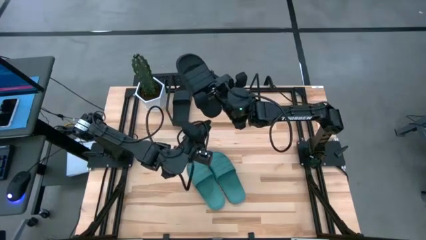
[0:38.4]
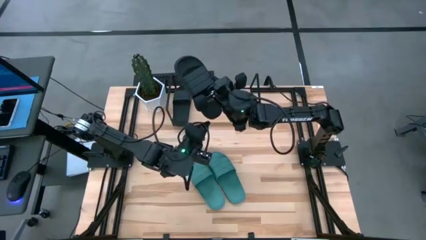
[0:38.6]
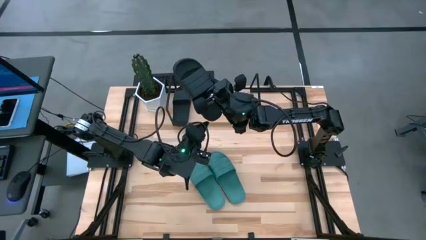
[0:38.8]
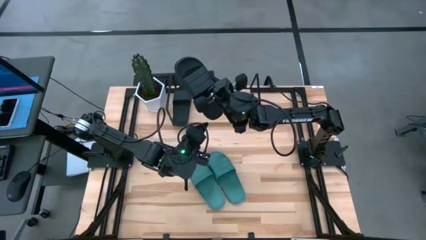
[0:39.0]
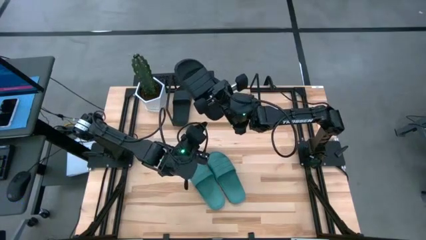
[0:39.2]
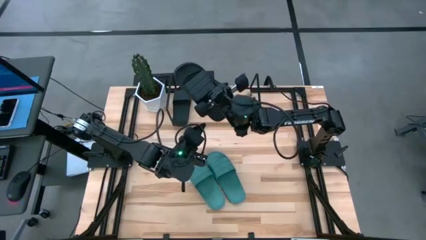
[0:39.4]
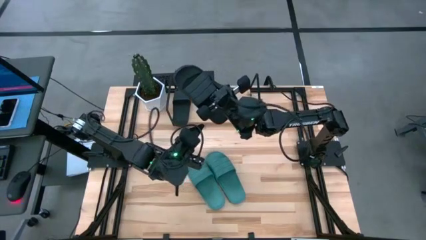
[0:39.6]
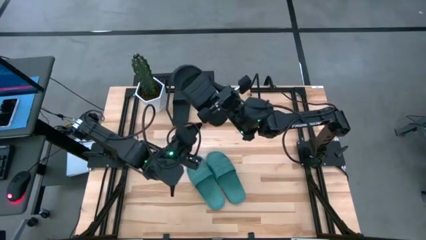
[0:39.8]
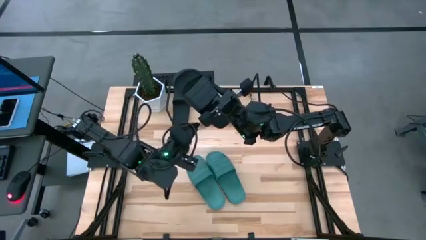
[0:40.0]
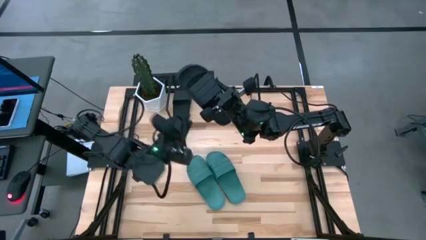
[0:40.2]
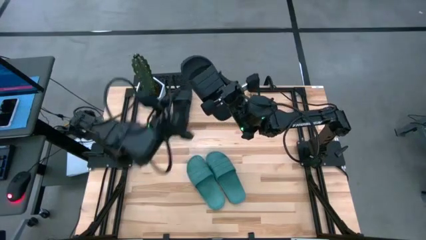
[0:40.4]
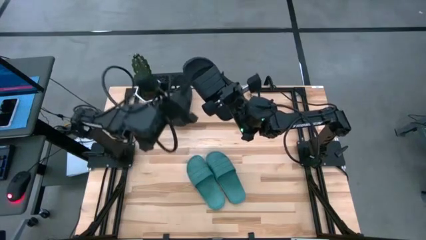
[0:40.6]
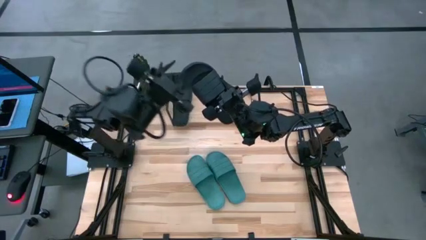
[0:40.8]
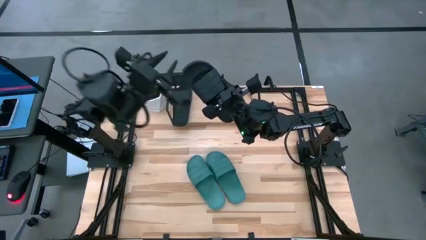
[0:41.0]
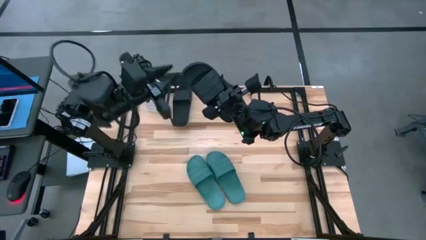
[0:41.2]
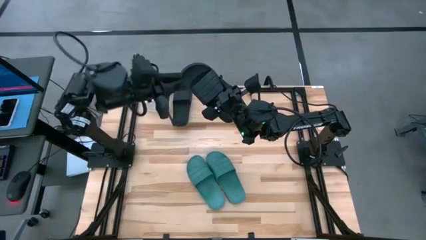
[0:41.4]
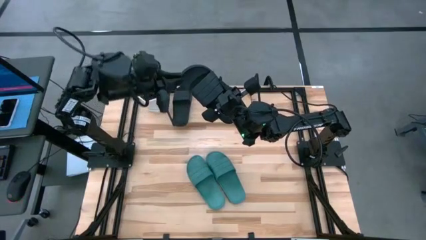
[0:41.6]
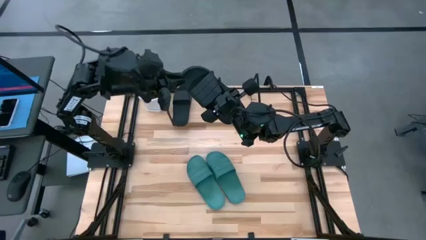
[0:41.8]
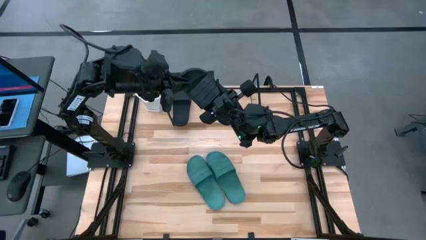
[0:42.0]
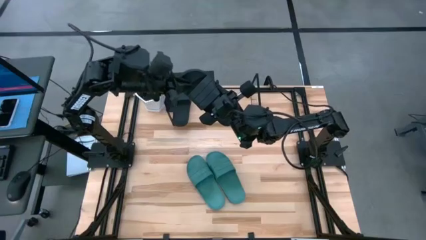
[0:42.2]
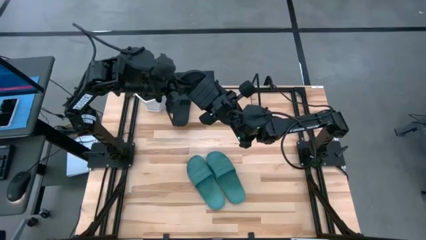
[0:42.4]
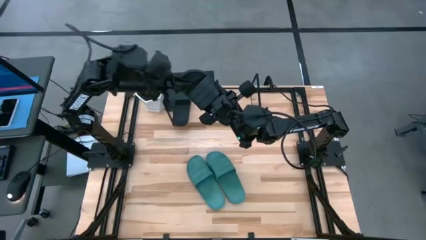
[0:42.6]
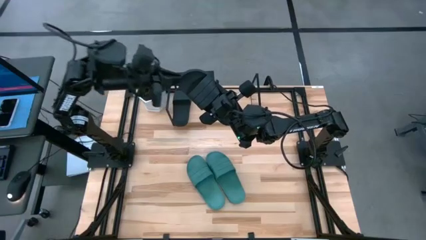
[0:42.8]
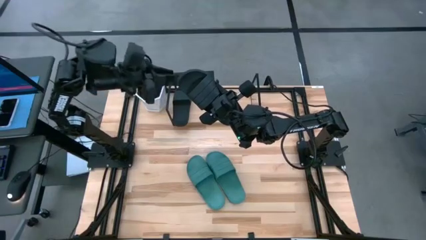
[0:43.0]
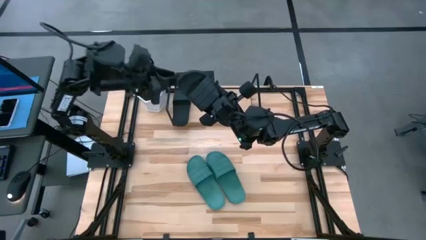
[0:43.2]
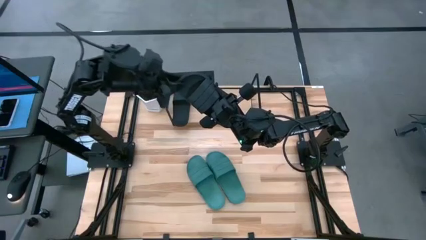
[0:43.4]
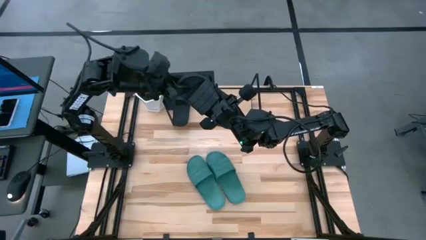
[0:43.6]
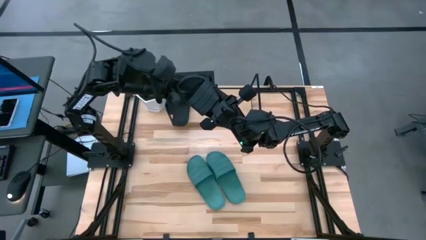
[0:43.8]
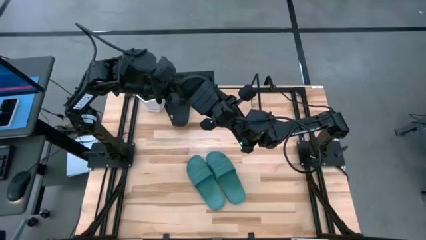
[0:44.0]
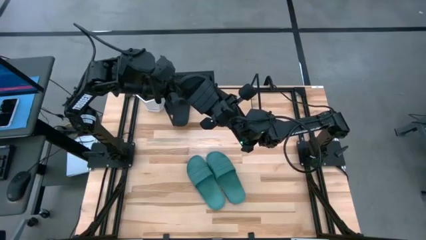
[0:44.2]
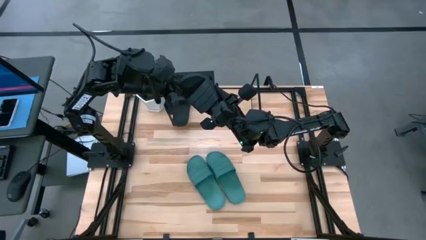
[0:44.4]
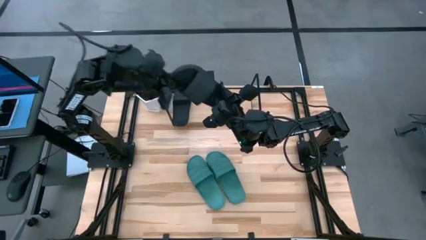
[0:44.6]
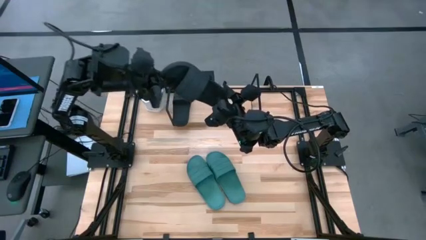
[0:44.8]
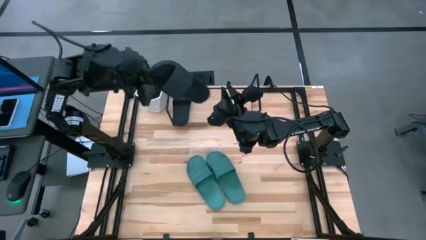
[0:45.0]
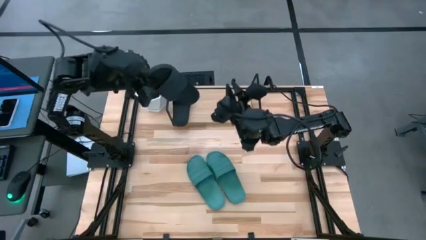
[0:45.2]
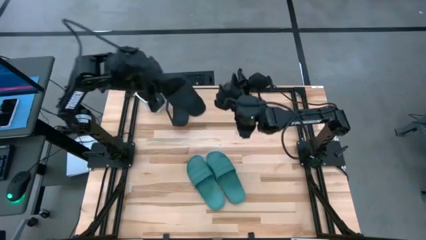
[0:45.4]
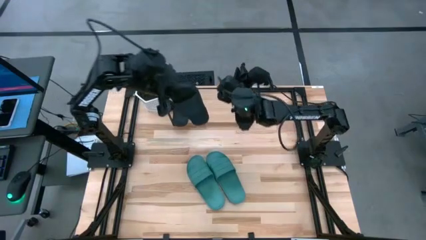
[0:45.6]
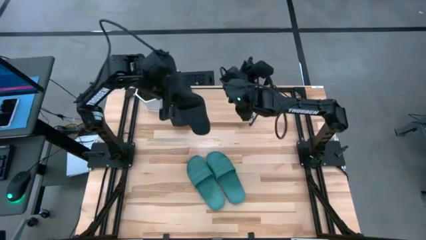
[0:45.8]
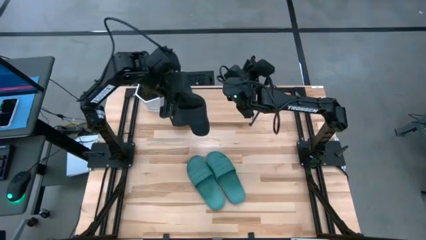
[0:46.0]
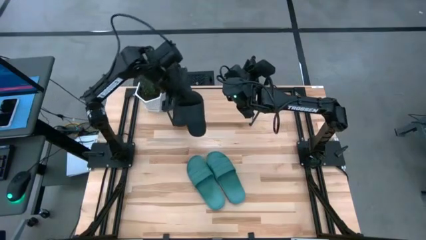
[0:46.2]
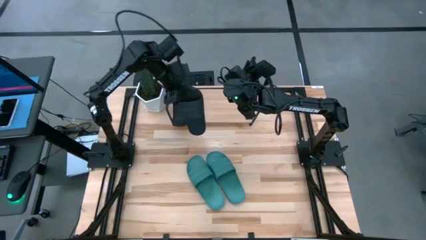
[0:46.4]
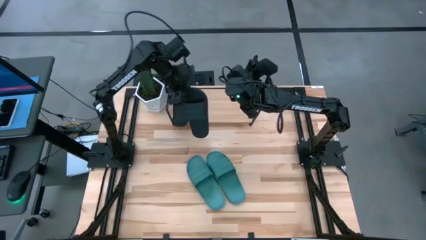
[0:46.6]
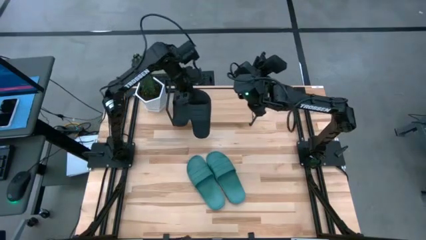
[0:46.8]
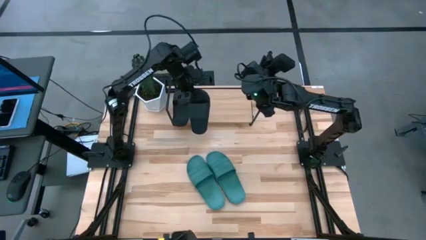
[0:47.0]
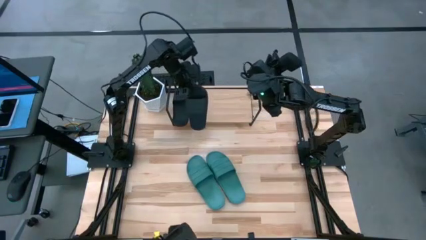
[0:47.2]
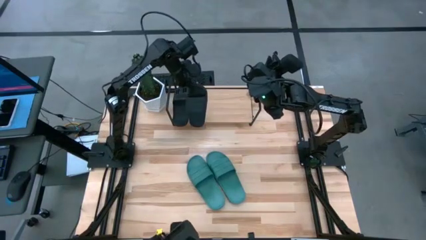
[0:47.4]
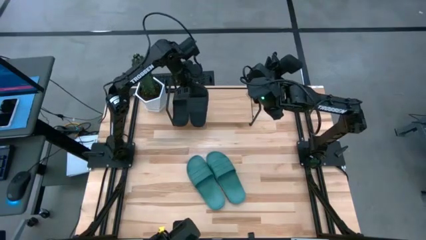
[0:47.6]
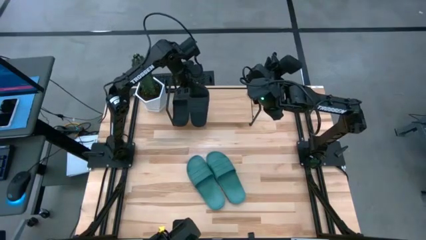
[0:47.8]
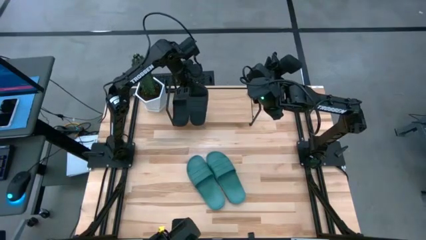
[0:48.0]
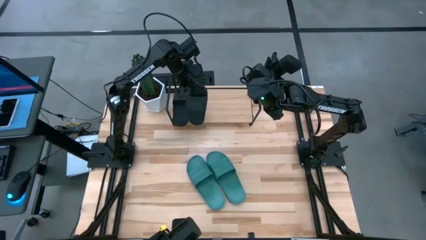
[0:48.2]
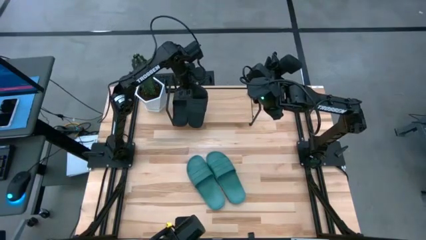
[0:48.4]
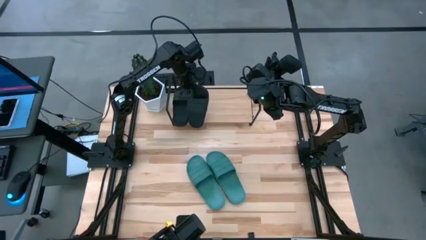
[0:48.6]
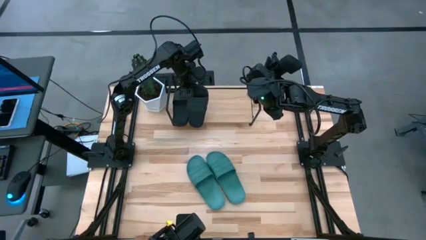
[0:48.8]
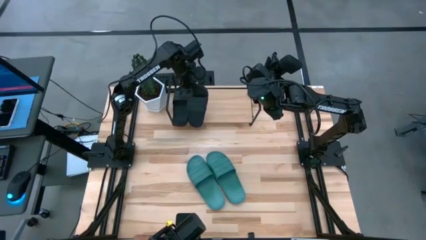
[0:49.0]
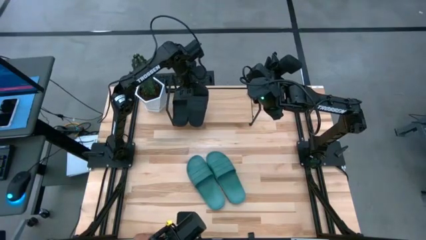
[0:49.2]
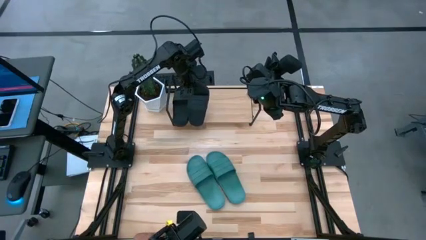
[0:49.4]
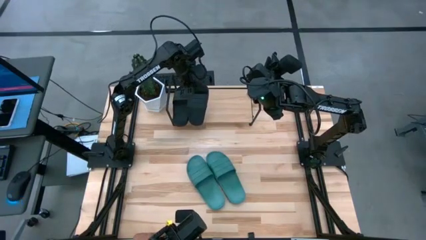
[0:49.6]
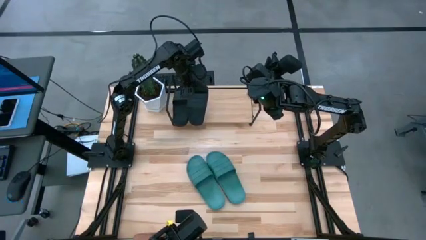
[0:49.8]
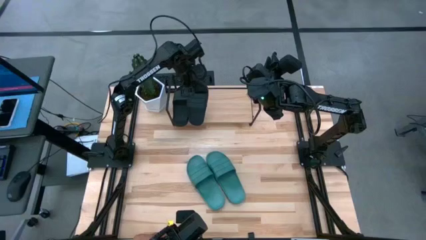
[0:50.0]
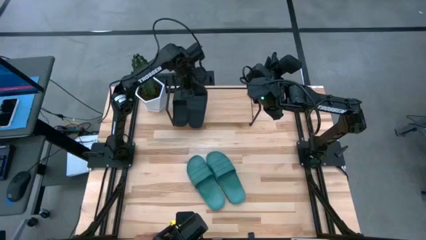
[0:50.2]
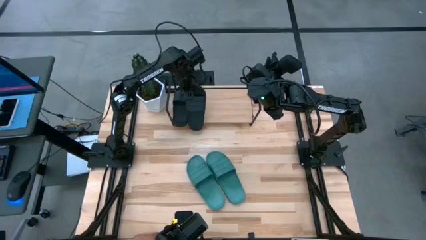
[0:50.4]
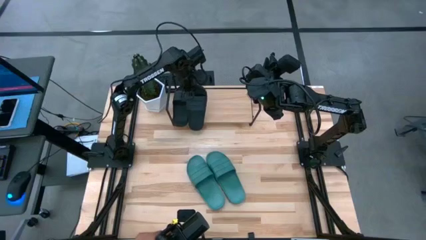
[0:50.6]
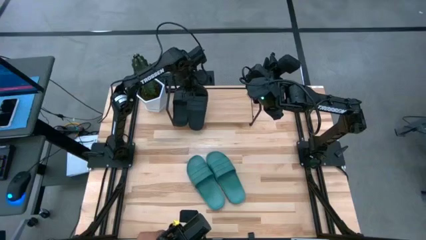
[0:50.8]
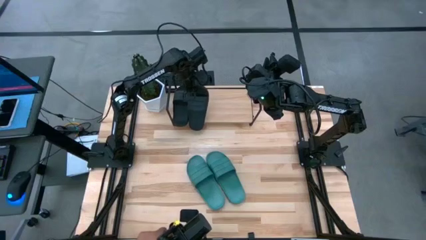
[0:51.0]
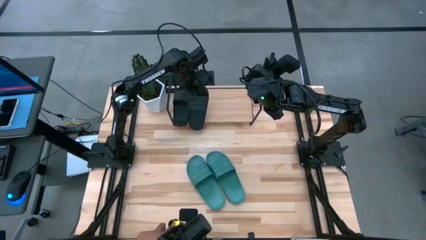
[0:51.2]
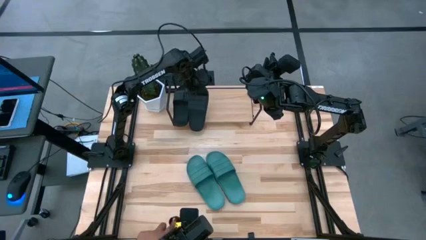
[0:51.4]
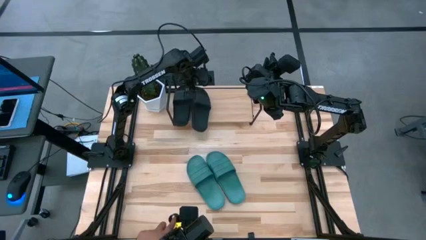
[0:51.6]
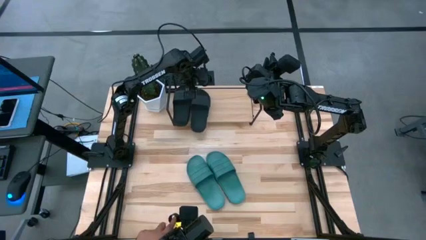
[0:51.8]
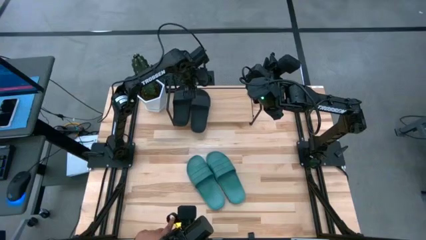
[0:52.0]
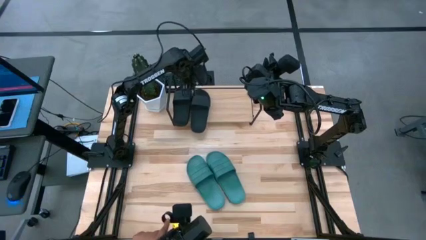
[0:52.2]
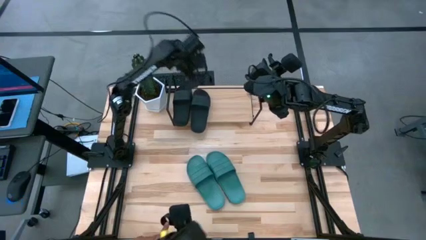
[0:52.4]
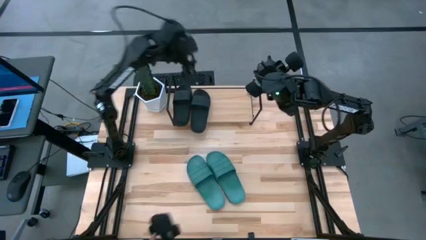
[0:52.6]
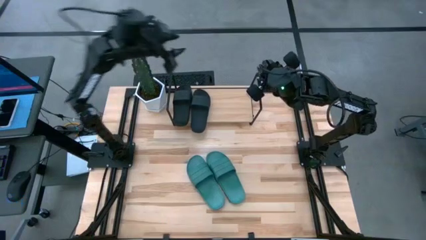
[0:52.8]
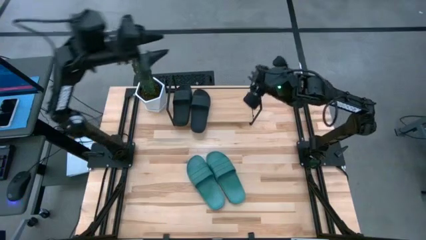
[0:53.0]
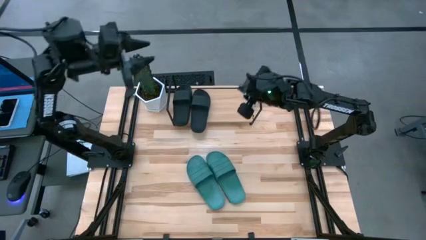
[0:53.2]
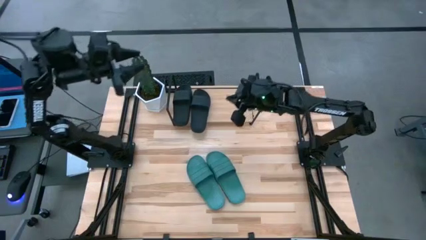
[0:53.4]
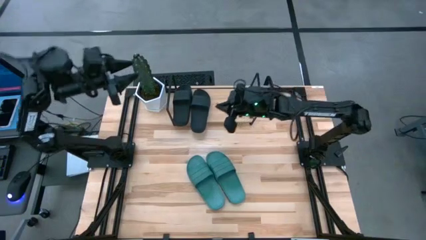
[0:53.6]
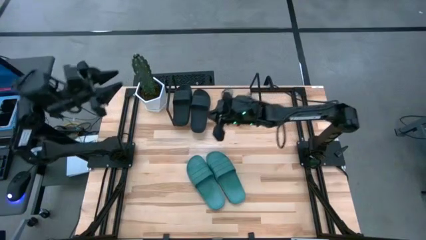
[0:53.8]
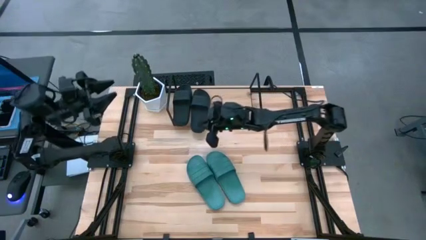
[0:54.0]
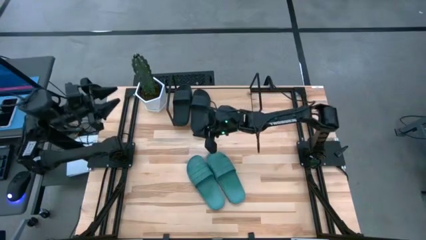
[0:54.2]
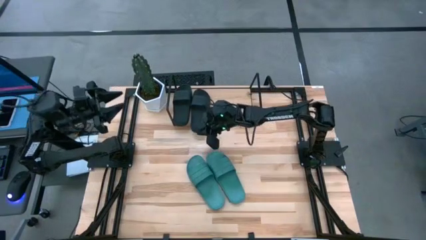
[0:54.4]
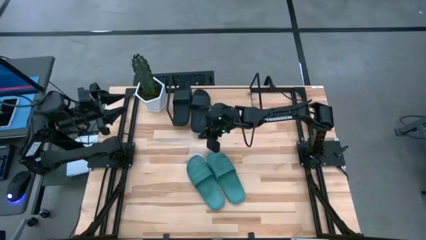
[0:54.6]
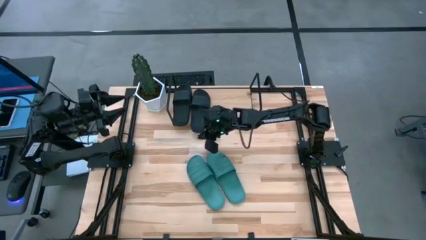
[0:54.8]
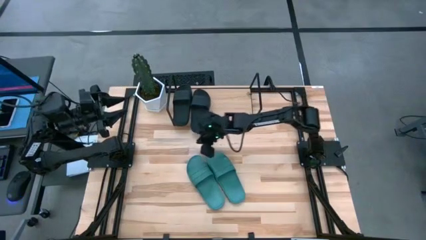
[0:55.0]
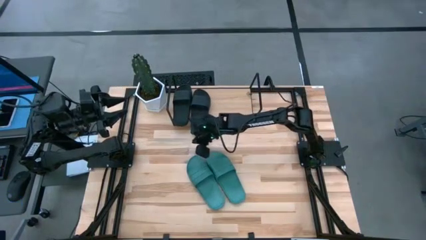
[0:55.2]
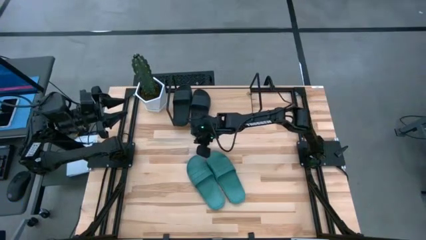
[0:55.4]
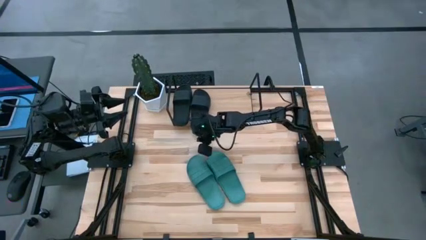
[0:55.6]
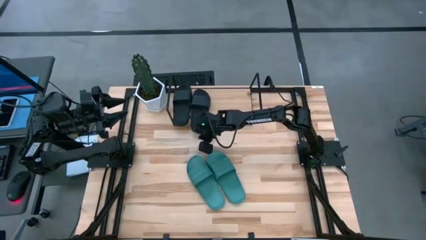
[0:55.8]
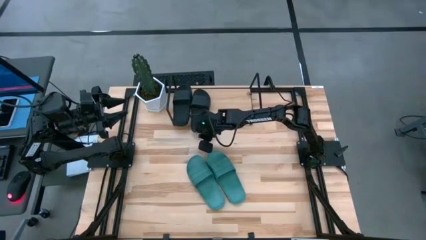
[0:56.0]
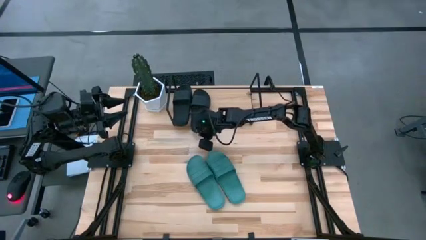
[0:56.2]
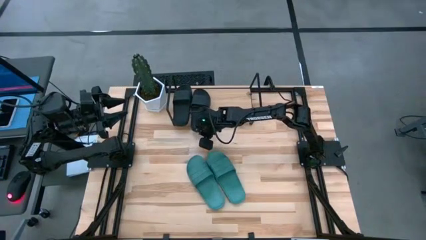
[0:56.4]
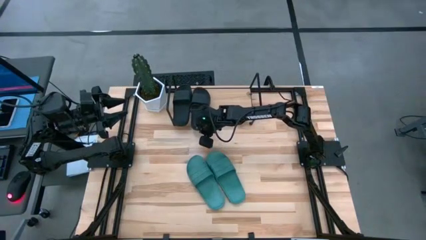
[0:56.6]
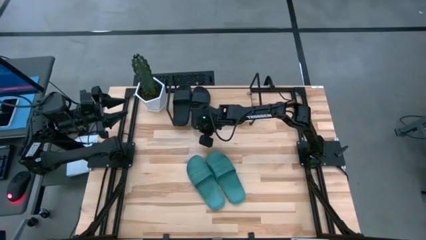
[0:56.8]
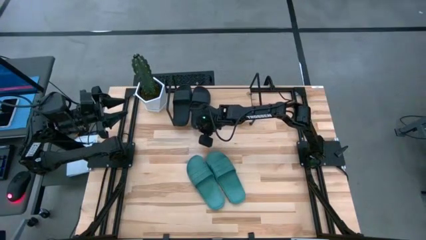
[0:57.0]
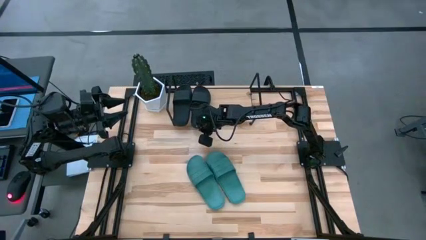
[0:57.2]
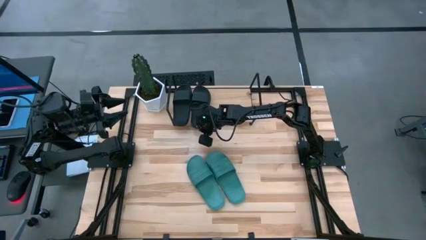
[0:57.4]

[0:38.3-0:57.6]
Task: Pick and place slides into the shelf
Put the black slides on the shelf
